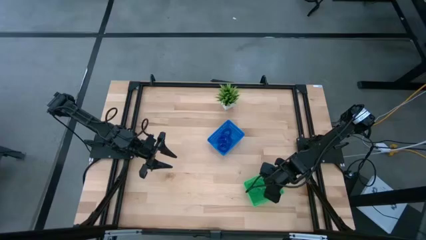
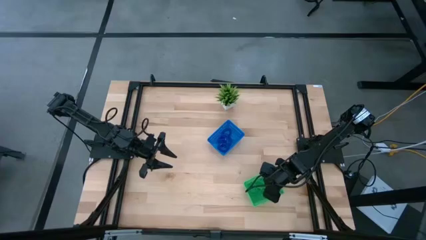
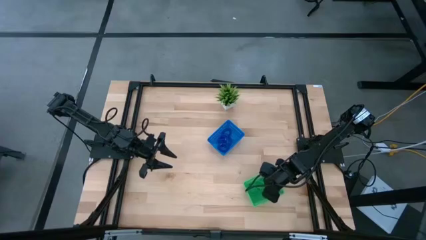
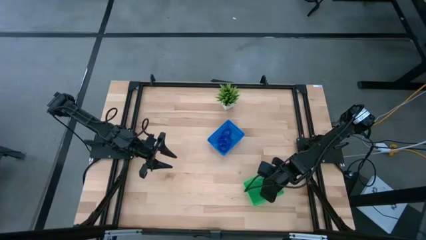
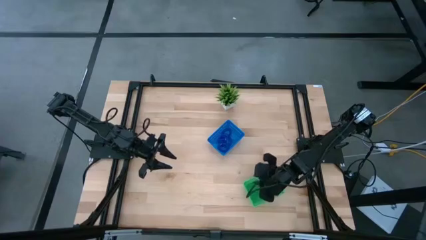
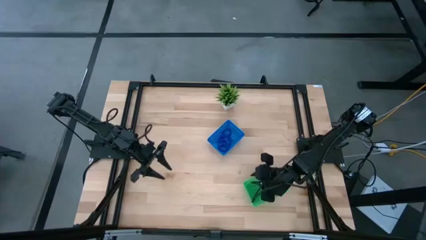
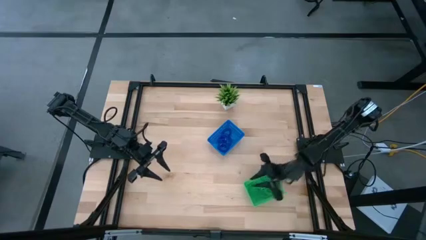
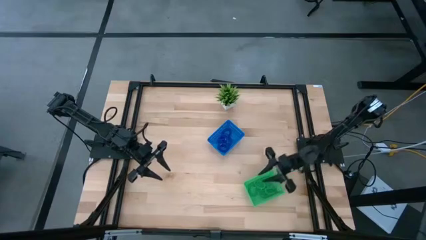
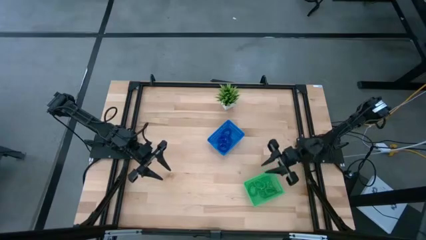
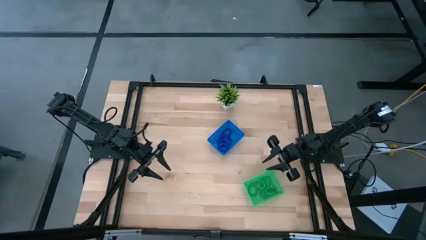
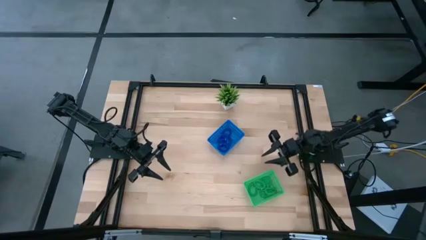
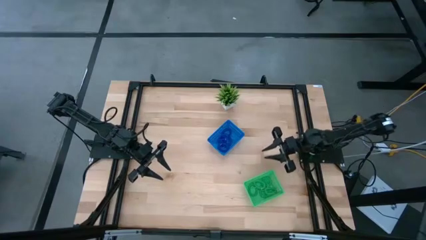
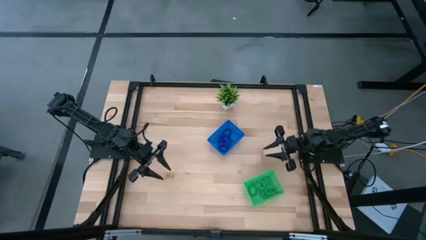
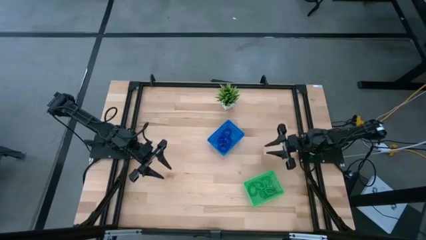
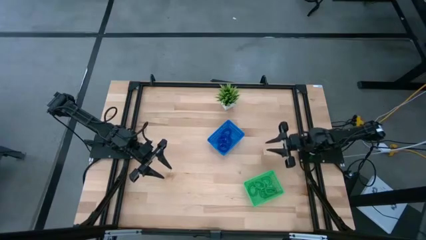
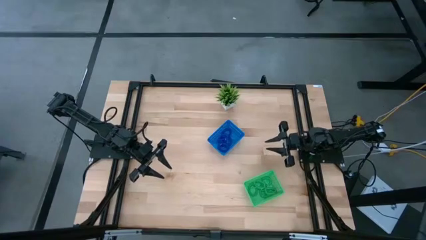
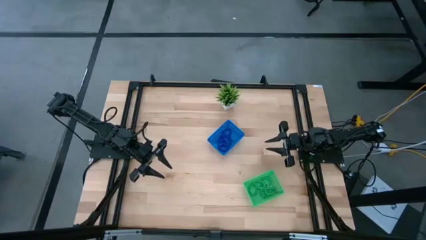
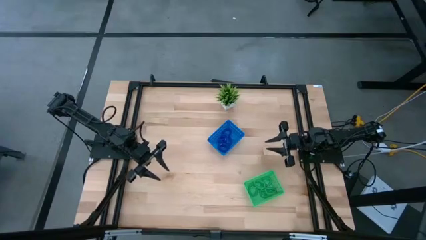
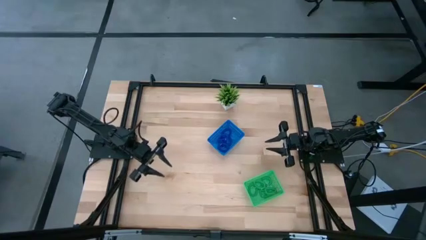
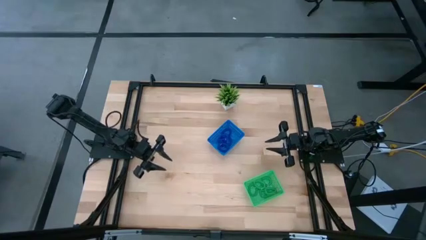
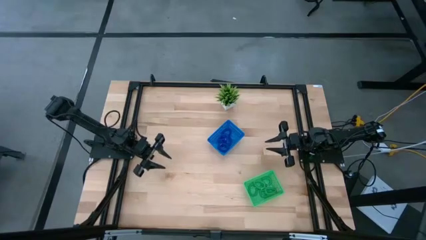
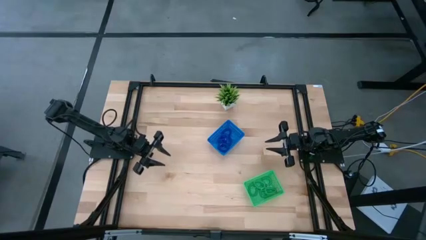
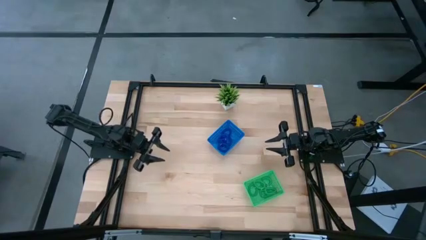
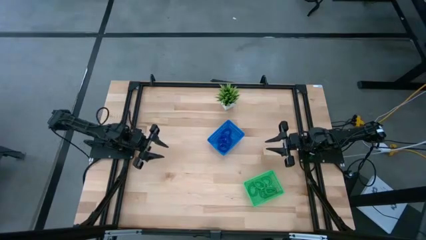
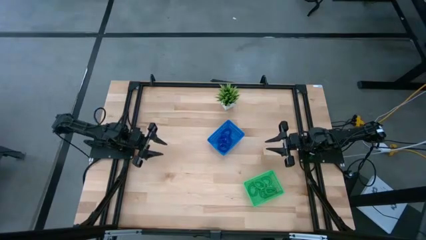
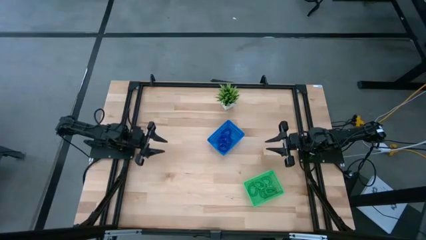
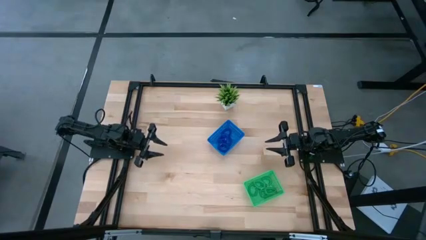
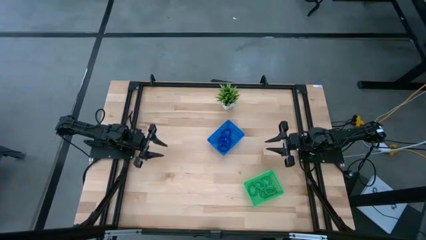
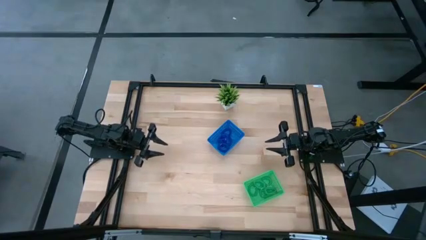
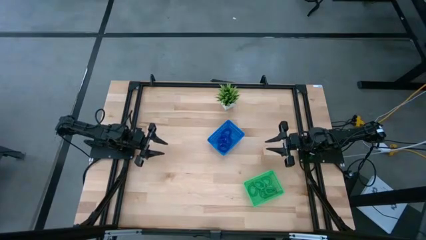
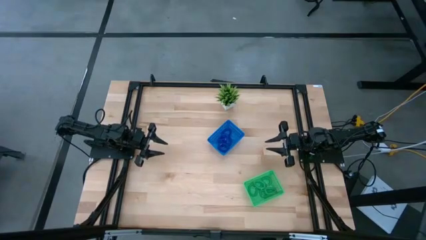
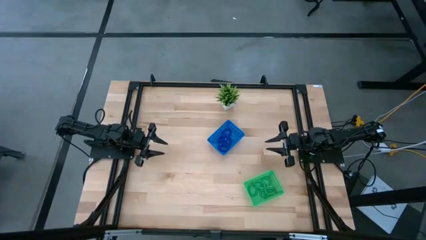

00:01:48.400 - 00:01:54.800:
Task: Sort spring keychains
Return to Home Position
